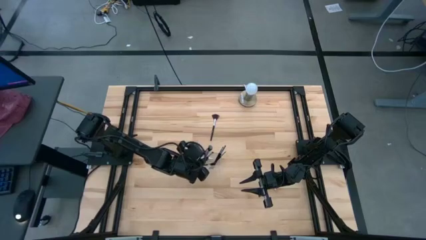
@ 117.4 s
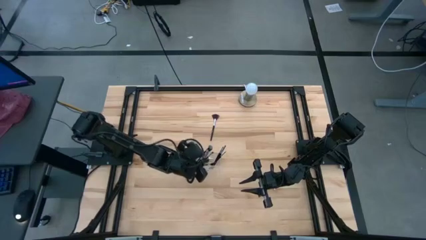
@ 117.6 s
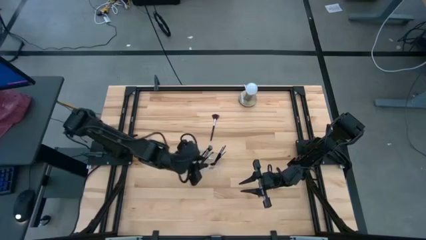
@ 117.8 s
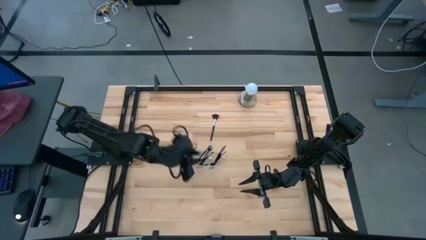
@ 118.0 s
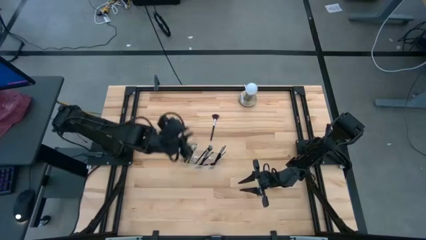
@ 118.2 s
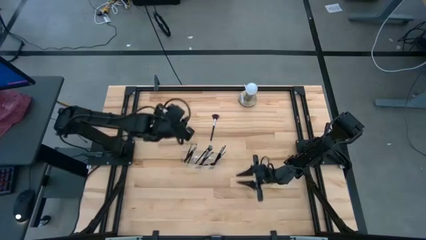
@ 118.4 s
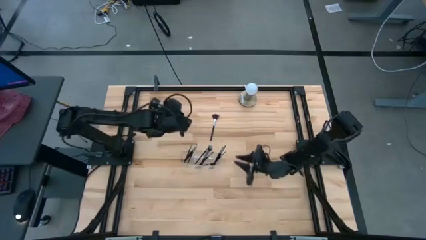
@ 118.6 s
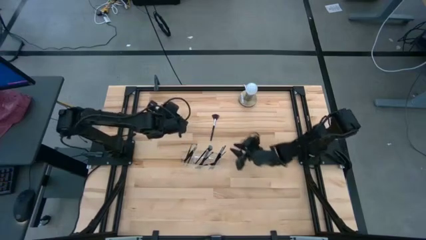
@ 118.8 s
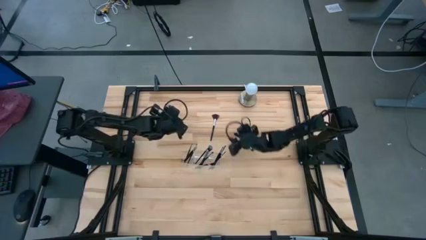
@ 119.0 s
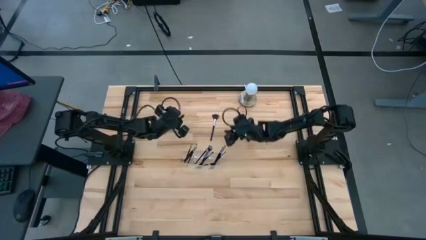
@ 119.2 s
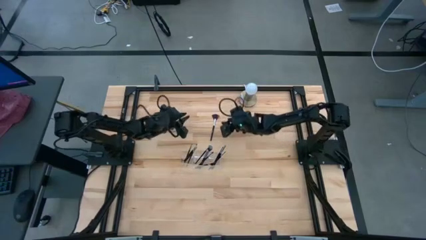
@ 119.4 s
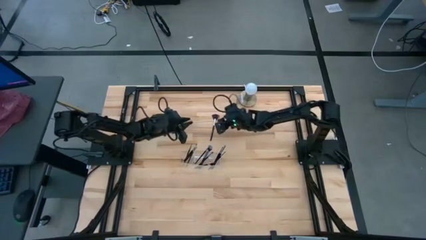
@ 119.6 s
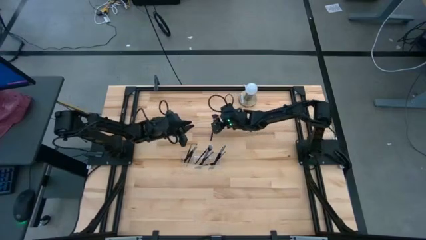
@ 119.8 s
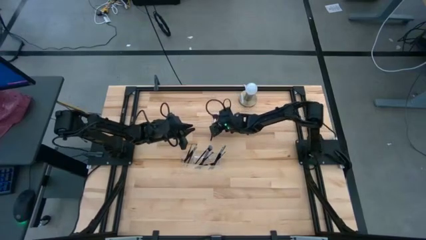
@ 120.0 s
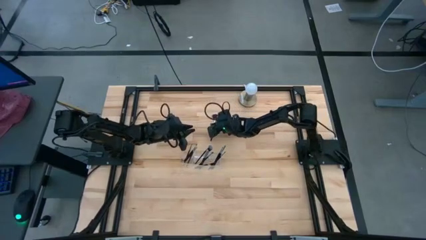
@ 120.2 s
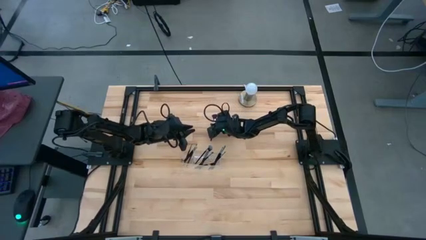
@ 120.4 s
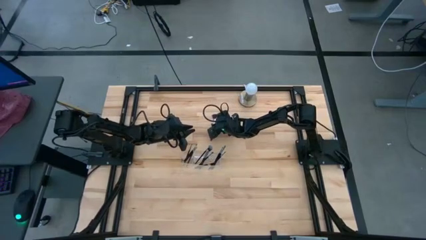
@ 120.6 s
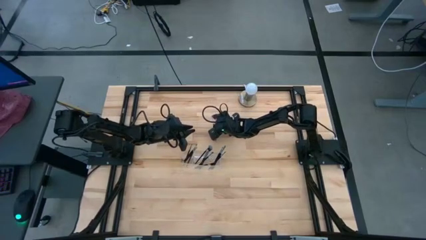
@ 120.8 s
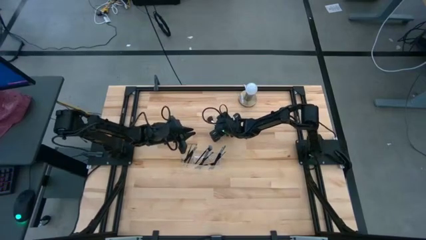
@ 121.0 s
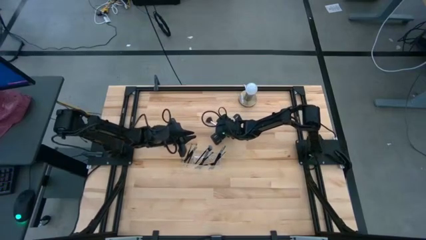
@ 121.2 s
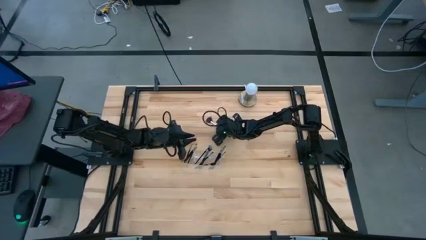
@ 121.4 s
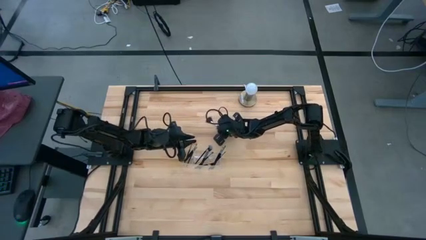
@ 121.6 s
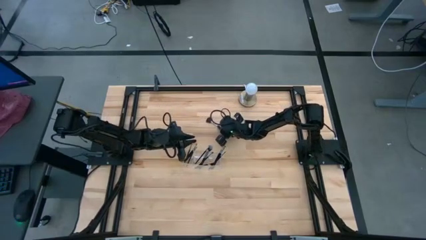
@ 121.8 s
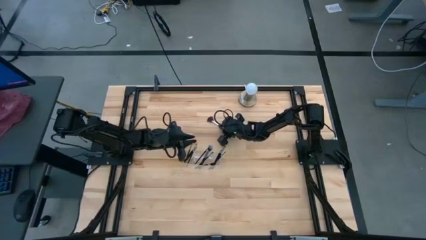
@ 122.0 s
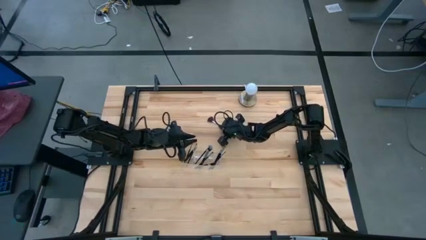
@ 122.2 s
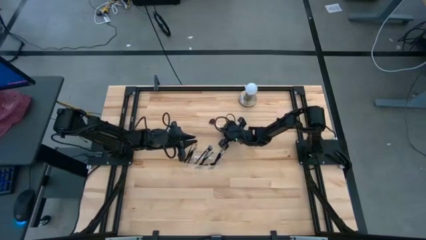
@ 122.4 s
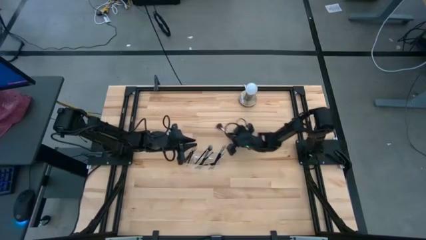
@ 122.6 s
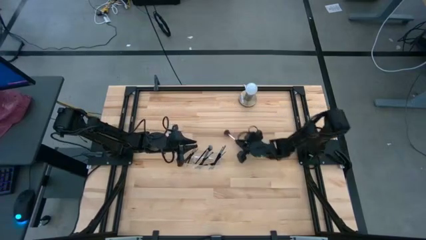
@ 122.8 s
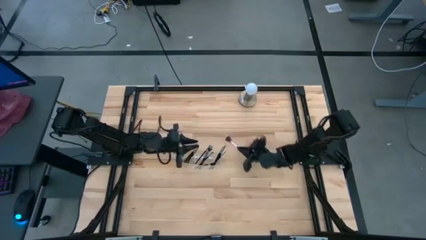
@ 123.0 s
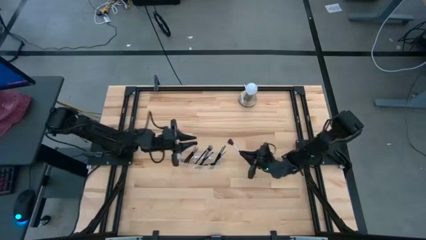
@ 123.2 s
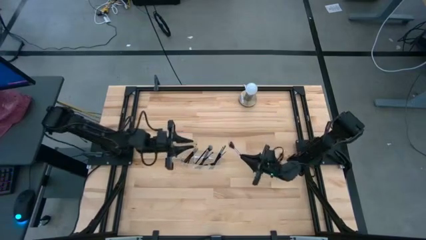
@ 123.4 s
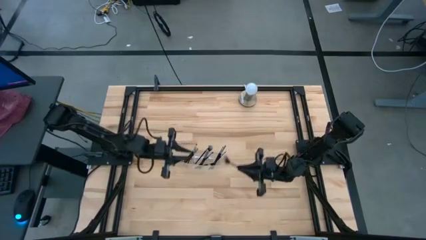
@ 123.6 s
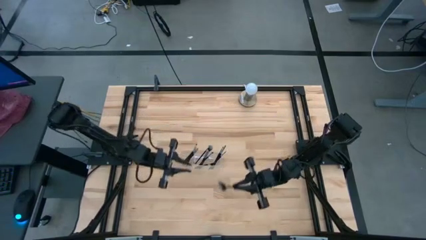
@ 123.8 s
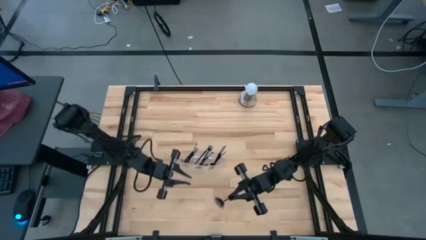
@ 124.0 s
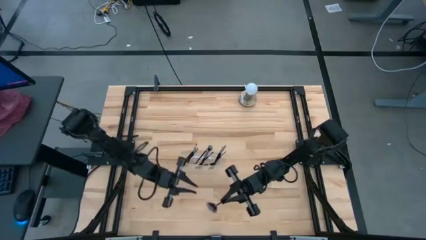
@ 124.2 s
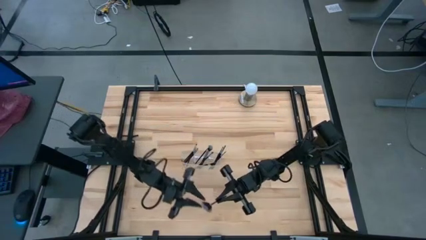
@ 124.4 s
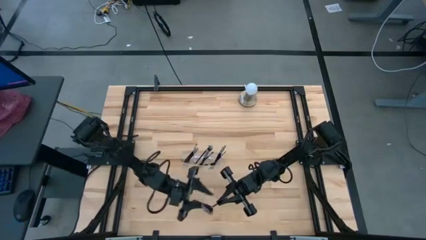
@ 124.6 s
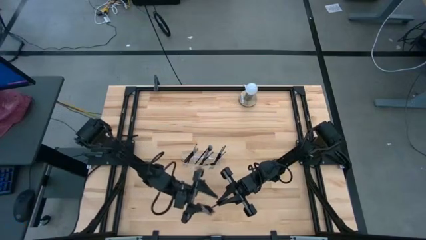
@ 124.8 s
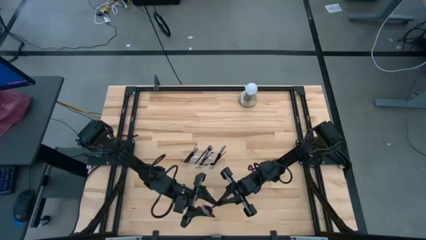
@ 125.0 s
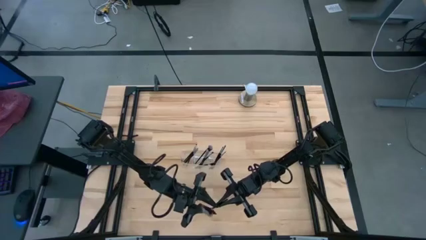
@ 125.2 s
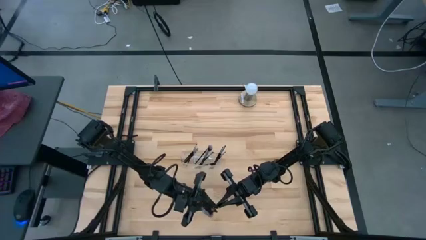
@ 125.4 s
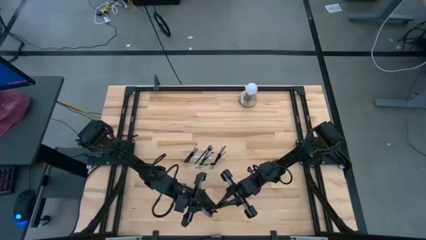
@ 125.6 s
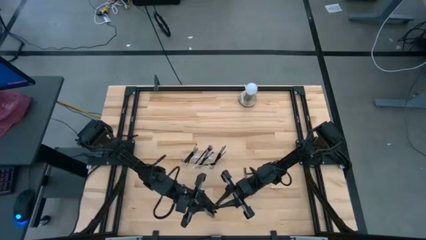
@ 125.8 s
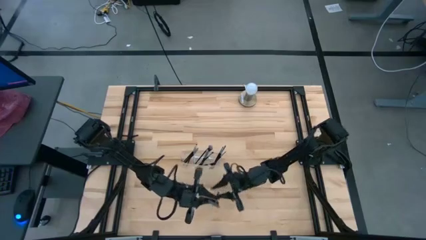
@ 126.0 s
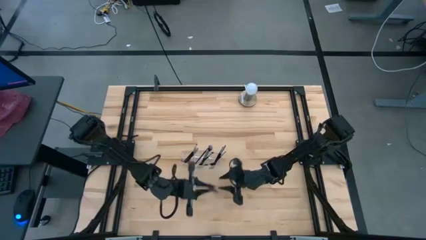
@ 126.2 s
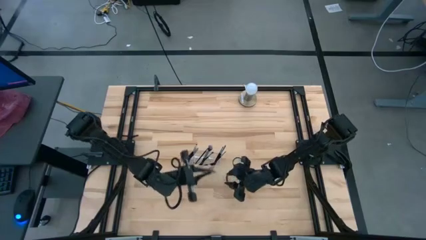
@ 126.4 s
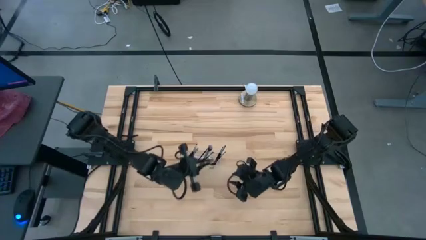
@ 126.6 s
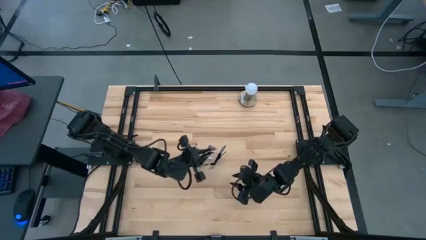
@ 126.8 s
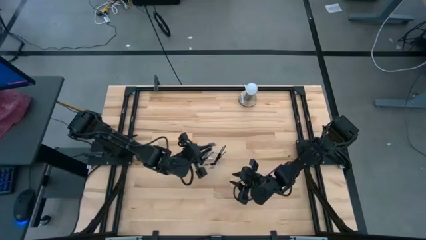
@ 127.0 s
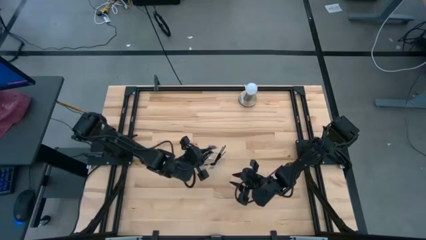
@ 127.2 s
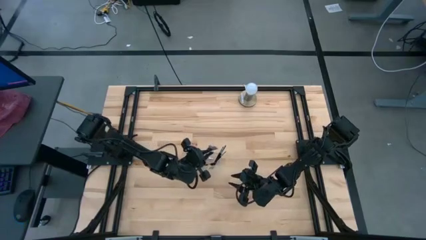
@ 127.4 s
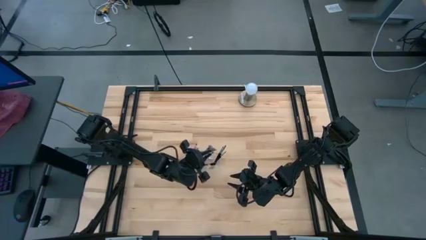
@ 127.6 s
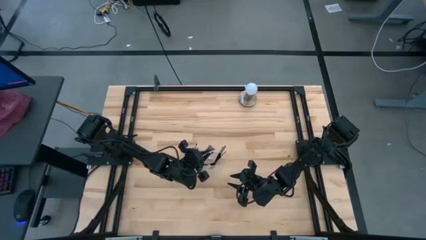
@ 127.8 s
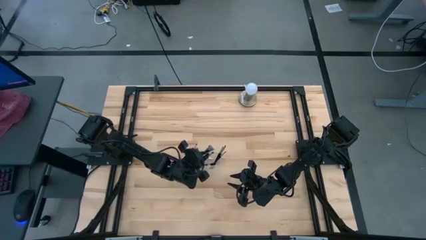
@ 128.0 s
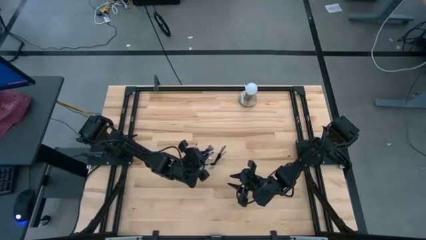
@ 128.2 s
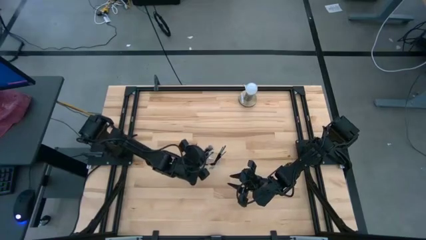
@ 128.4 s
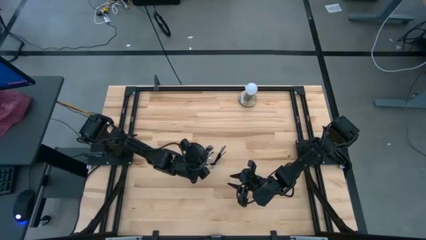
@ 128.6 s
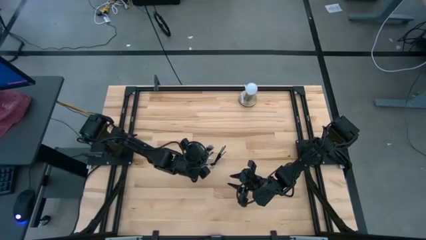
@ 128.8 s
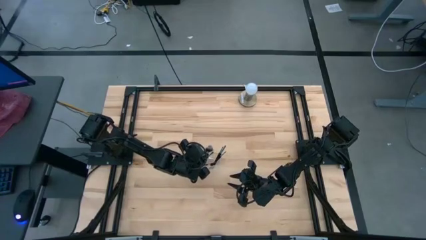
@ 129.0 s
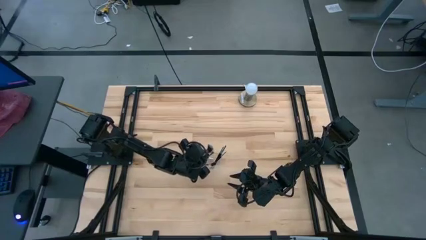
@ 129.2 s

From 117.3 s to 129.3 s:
Task: Put items in baskets/containers
Put the highlighter brush into the transparent organizer

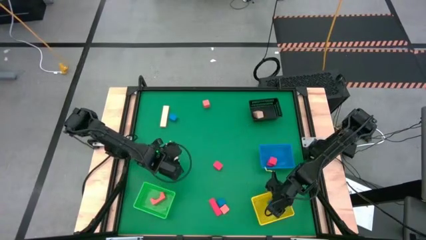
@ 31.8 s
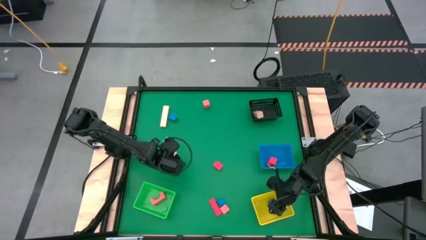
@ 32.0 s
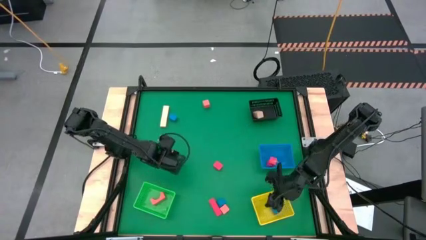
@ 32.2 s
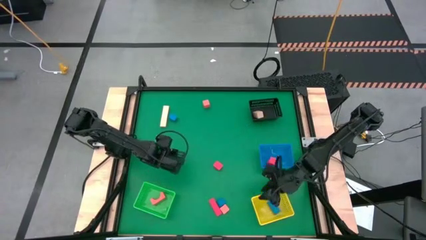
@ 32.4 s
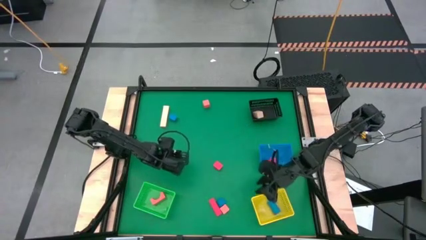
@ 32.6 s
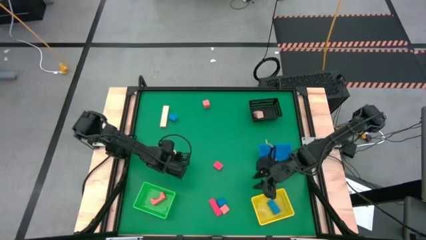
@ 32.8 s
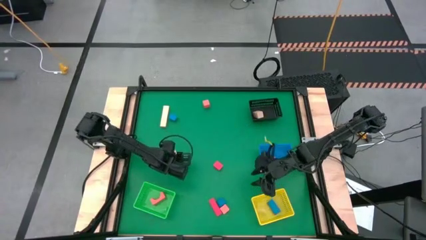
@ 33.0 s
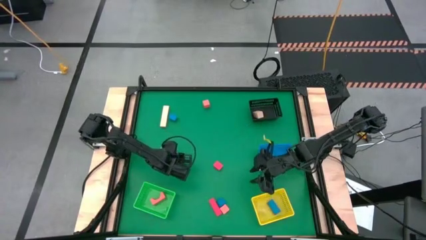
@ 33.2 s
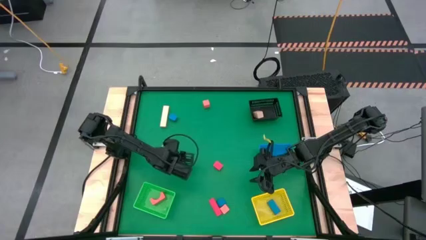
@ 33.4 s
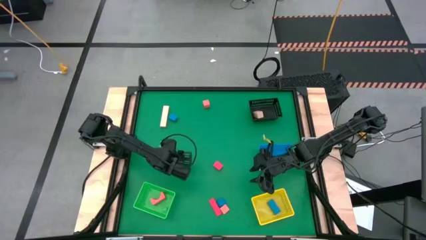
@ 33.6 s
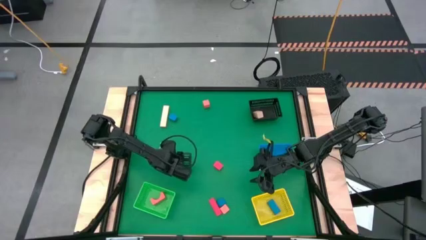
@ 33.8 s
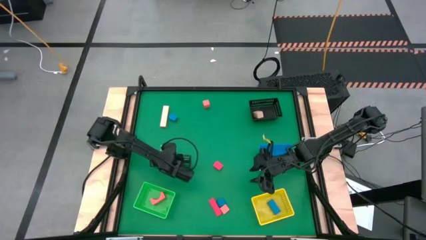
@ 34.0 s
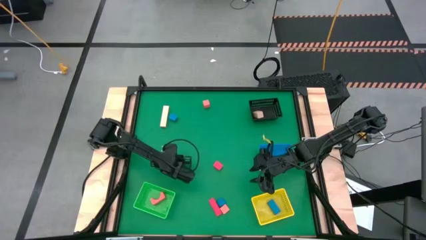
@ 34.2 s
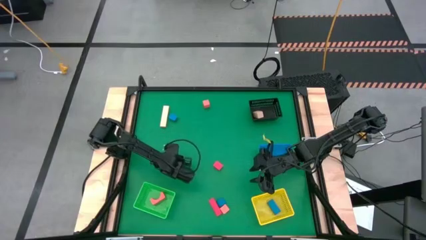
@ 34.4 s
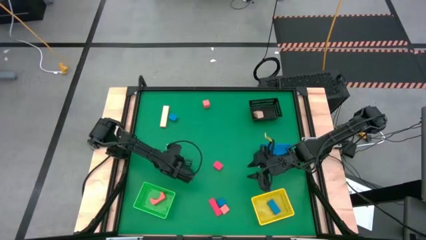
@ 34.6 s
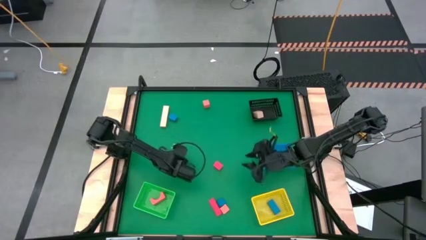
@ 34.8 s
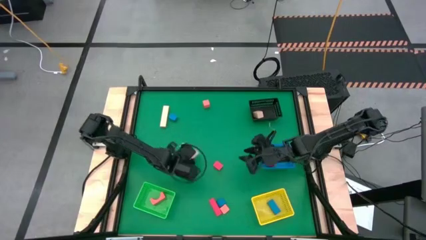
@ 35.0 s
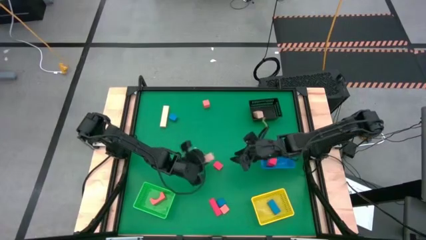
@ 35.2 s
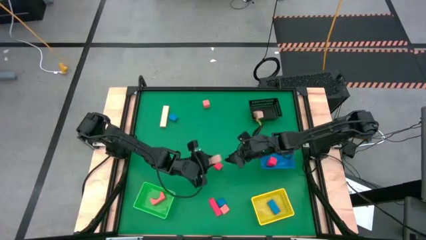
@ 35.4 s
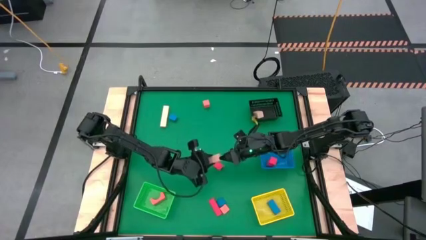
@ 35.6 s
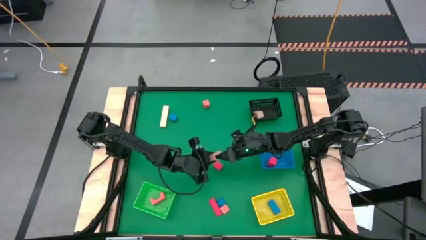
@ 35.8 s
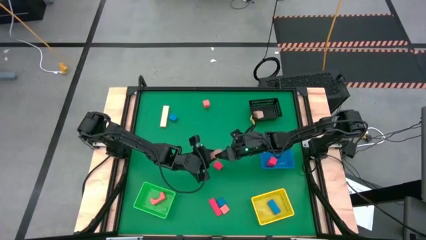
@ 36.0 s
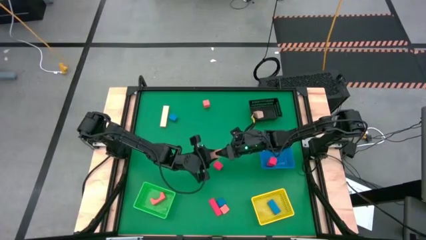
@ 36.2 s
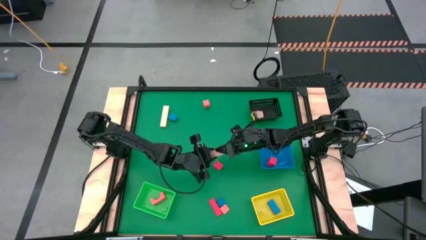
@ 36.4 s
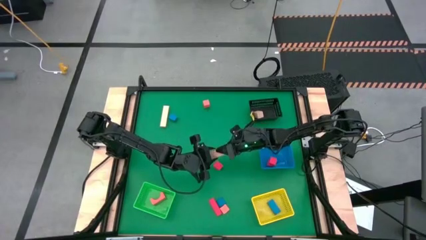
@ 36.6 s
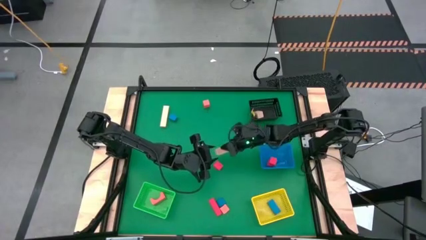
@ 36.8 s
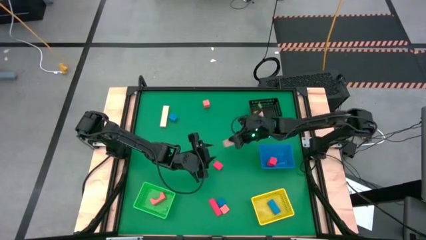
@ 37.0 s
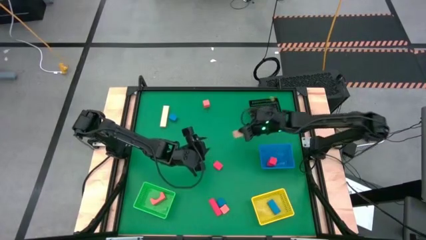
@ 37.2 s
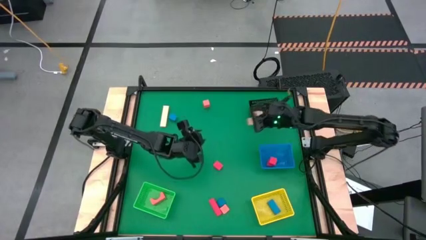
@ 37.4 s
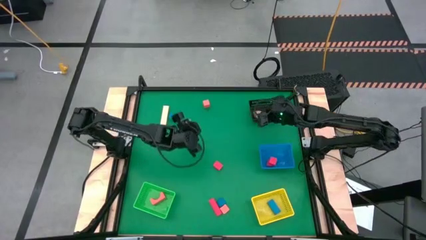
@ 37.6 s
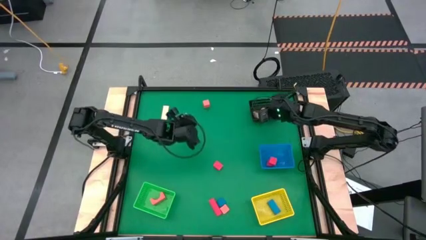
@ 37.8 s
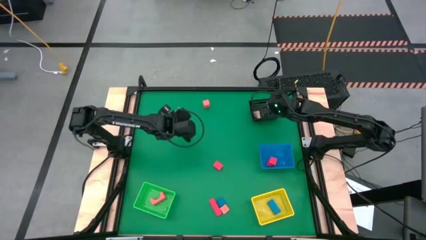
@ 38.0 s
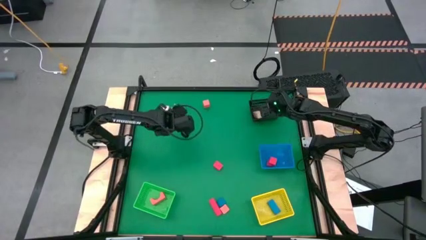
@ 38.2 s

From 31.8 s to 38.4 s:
Task: Sort & place blocks by color
Put the brown block into the black bin
